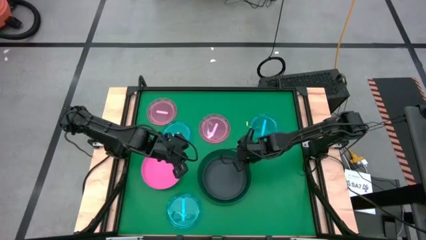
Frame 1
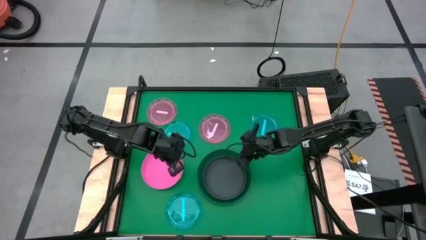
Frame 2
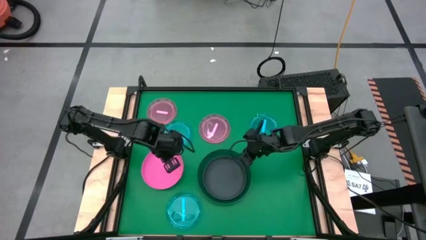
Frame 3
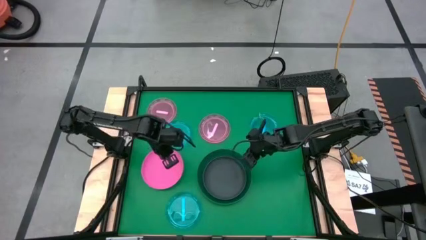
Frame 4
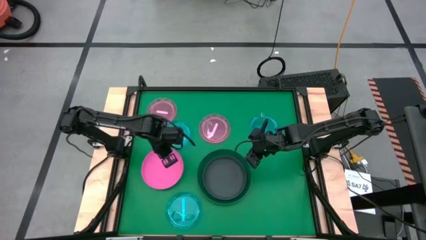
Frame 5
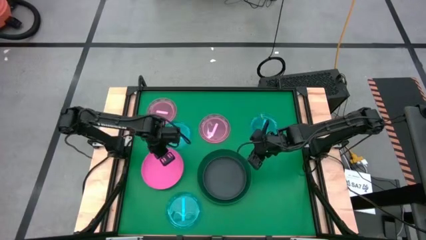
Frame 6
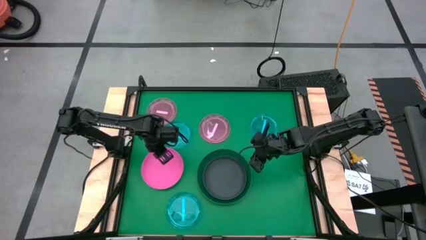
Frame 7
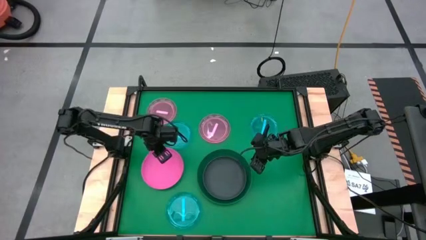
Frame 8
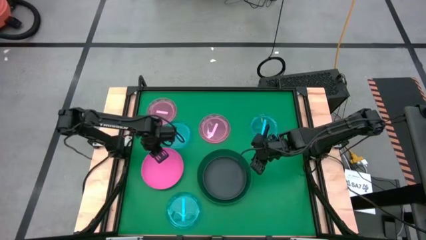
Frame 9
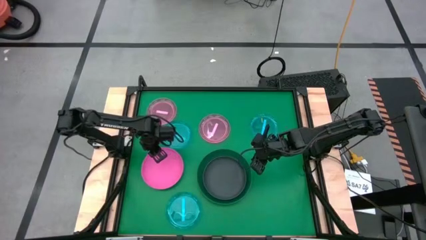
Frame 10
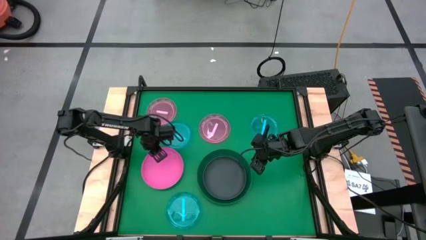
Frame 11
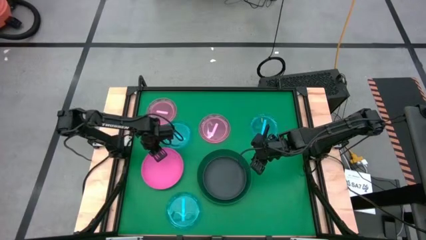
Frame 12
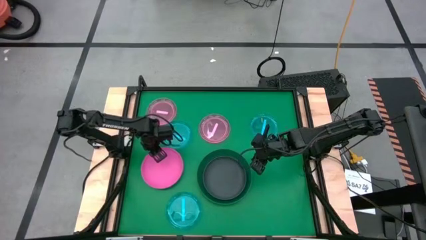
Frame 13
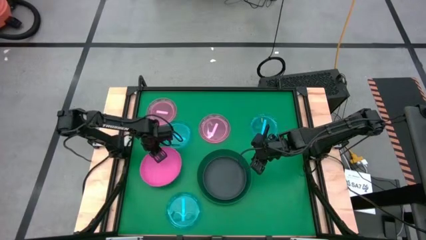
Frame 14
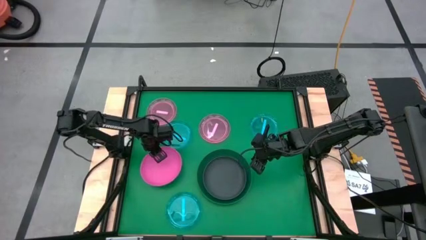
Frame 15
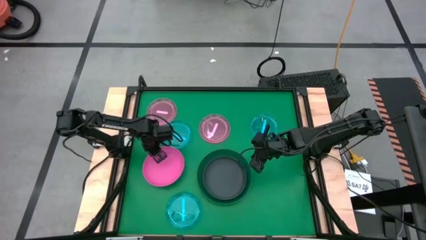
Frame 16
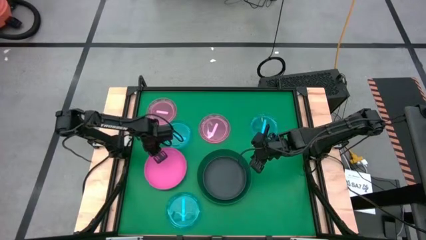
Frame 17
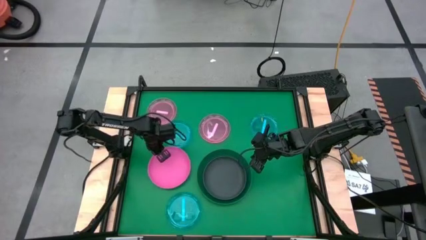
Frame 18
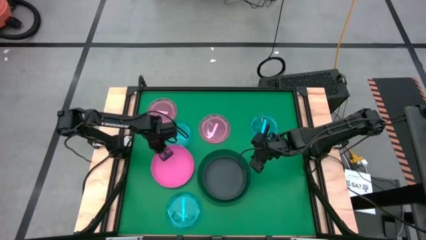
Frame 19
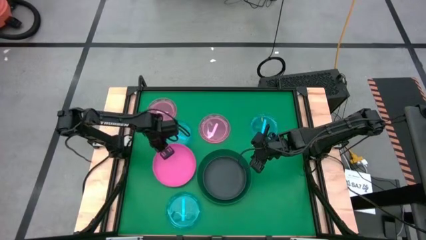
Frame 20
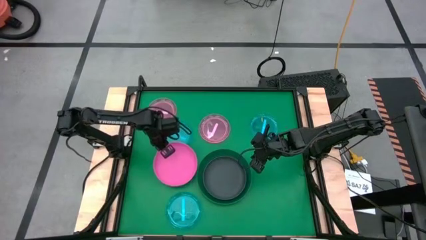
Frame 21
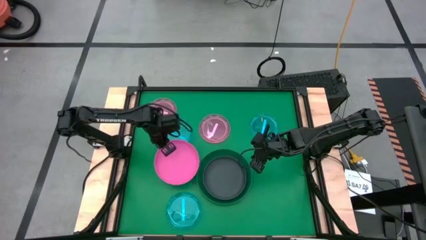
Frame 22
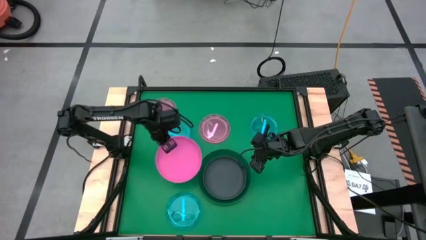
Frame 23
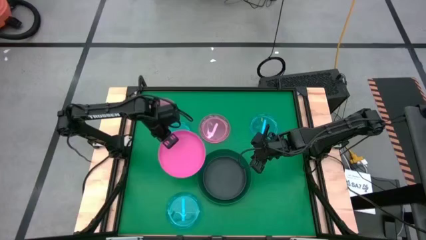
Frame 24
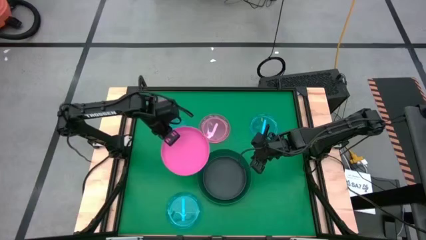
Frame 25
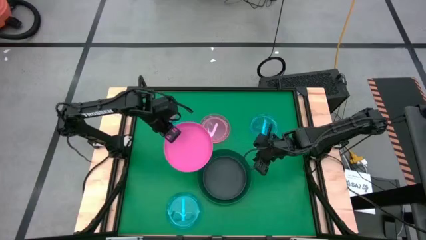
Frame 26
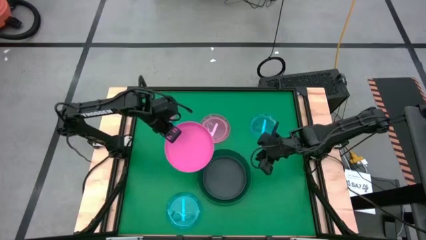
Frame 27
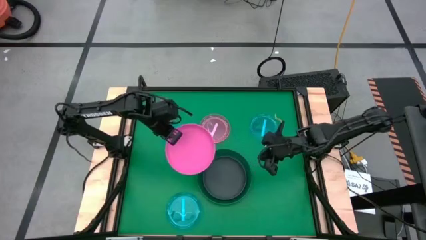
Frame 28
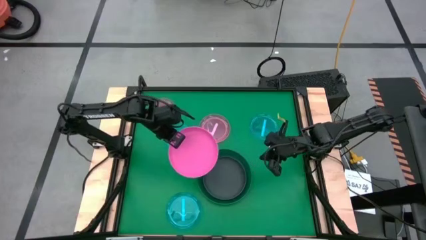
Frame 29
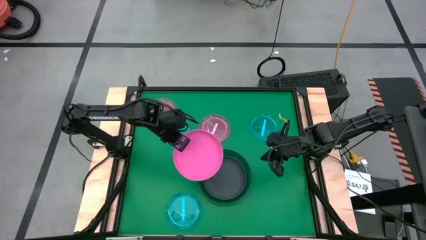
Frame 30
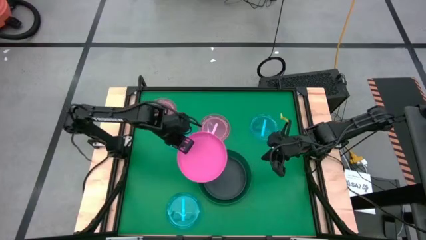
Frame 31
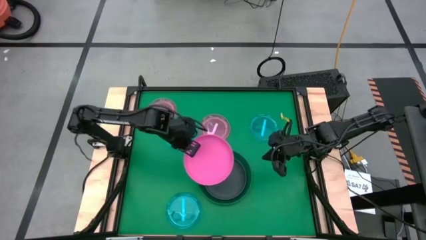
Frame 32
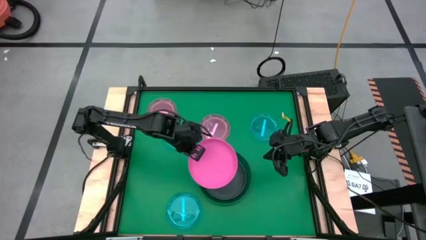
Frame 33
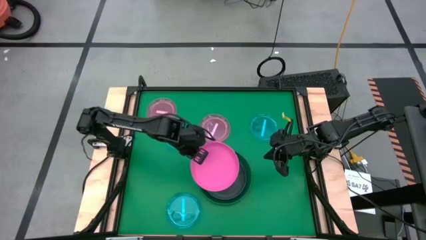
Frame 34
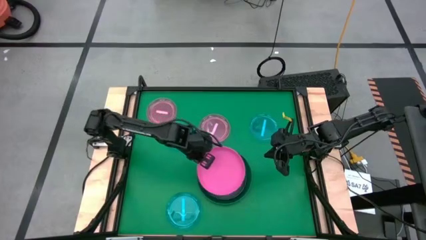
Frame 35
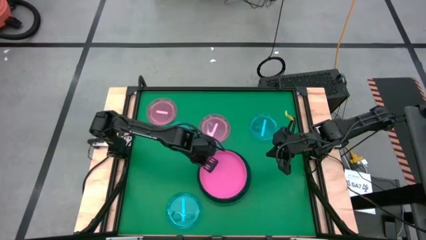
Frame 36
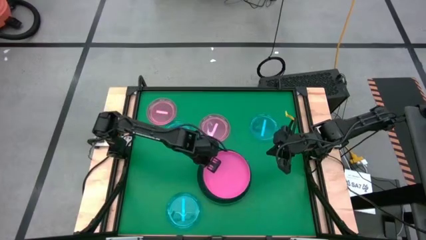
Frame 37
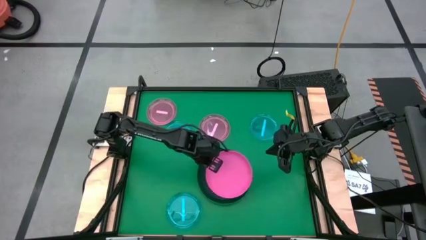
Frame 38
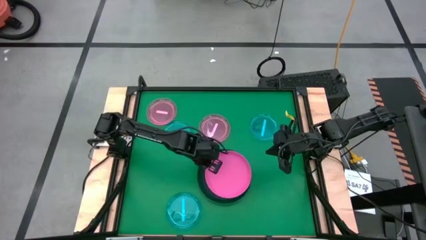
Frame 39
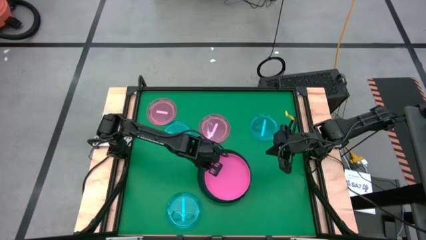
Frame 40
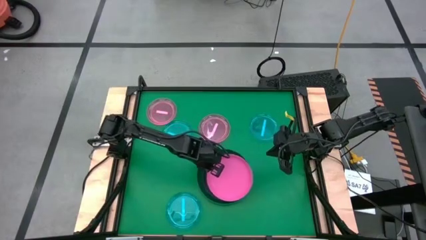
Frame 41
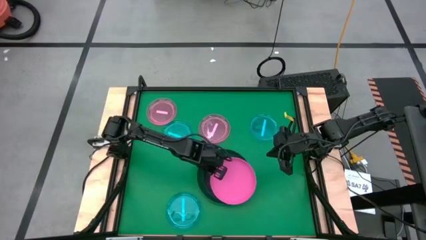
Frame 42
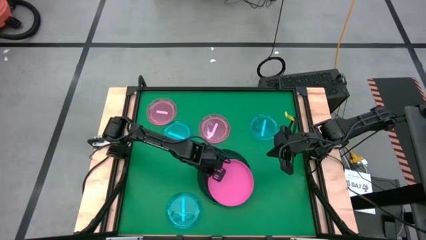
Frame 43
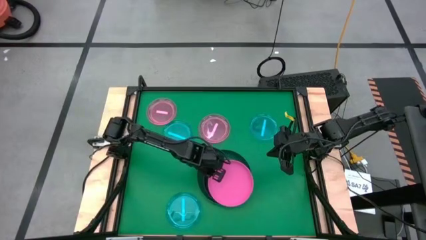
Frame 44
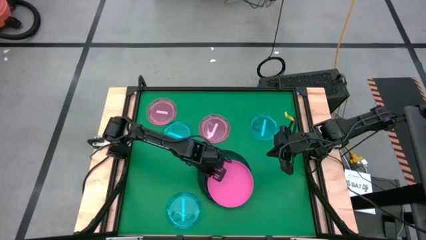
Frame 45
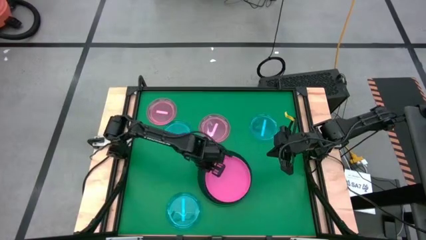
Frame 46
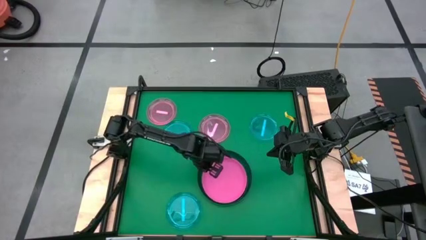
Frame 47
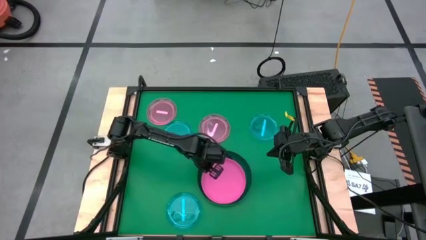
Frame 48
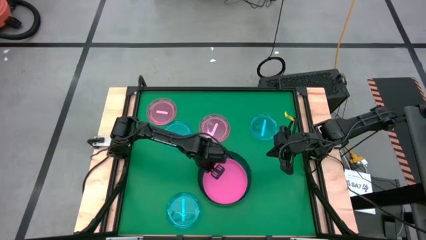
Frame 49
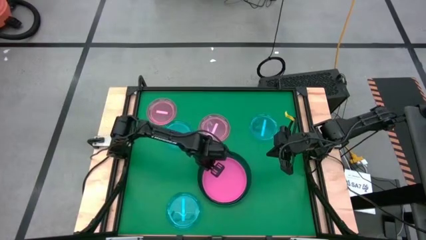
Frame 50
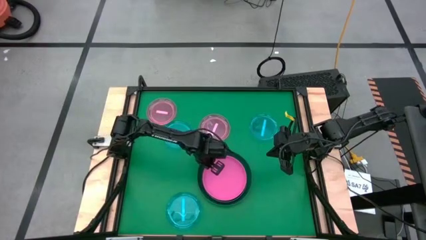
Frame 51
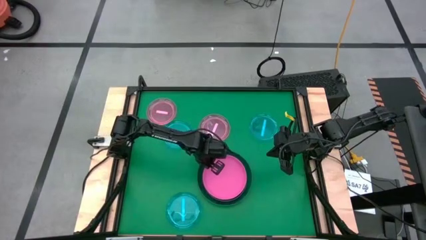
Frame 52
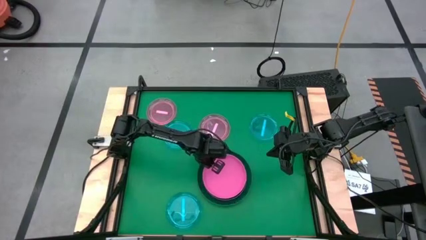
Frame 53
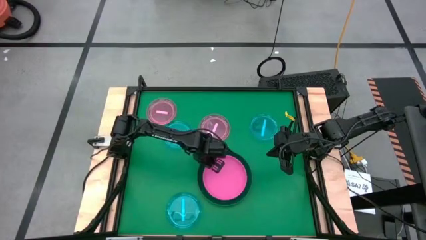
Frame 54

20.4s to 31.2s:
Task: Stack plastic plates
Stack the pink plate on top of the black plate

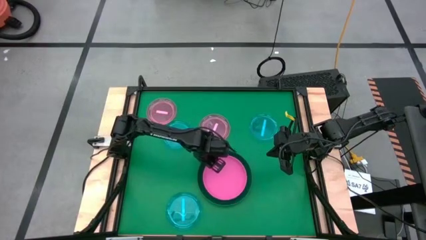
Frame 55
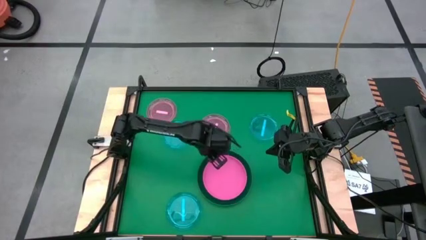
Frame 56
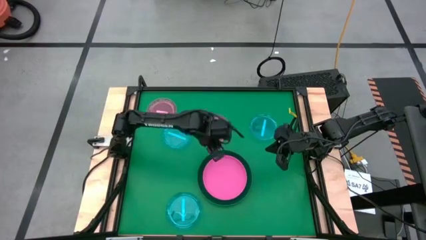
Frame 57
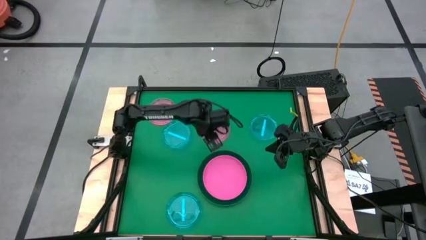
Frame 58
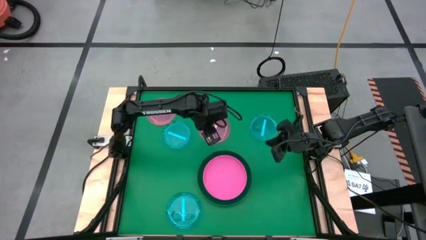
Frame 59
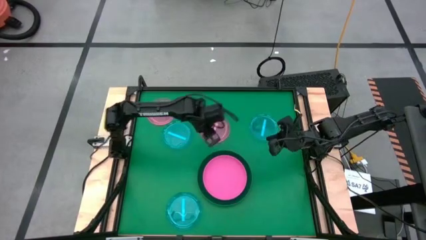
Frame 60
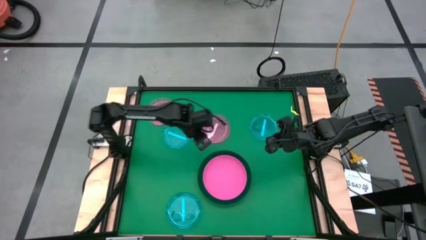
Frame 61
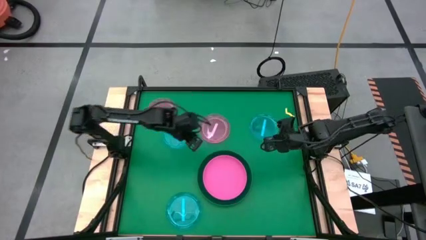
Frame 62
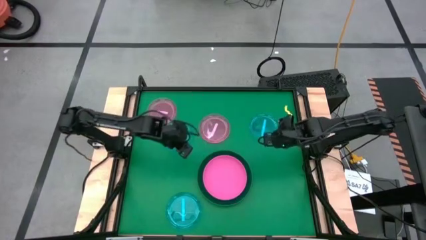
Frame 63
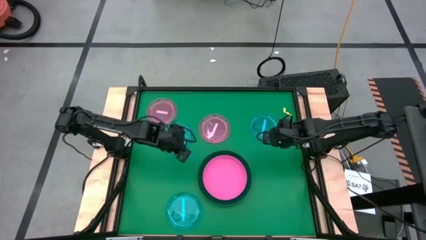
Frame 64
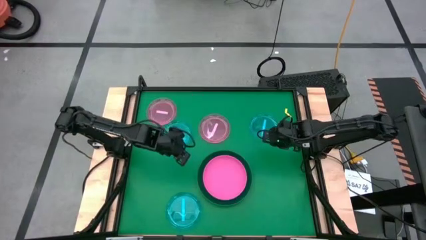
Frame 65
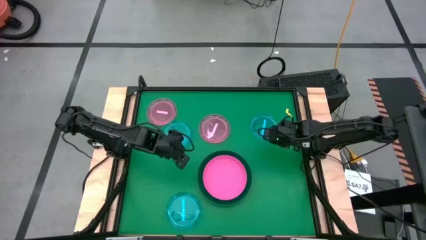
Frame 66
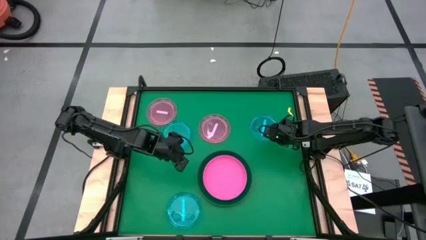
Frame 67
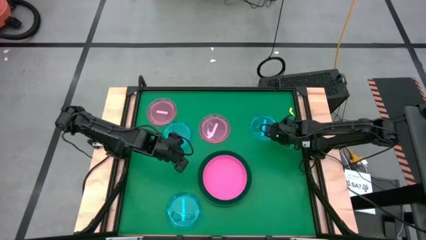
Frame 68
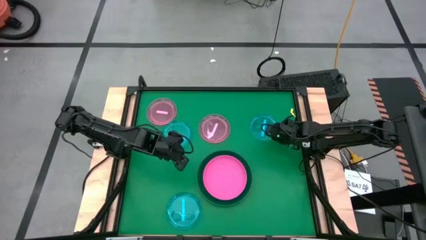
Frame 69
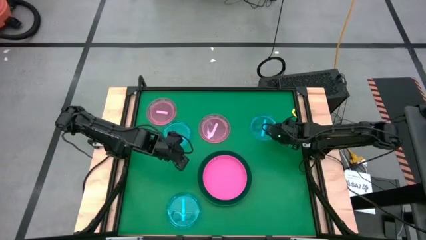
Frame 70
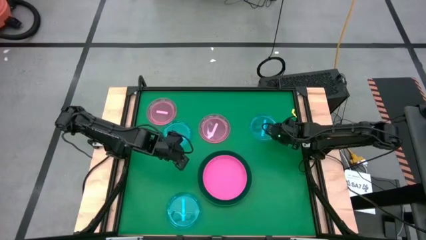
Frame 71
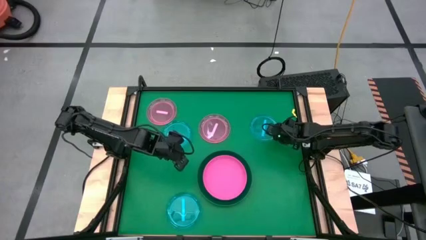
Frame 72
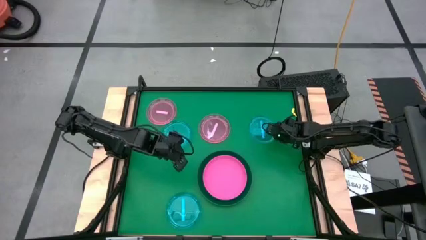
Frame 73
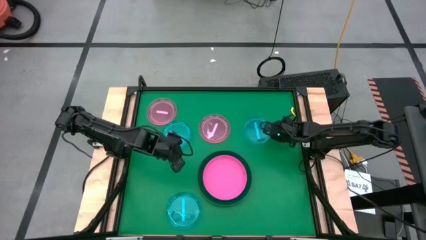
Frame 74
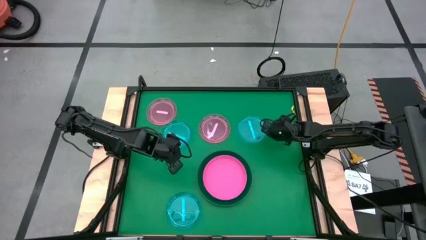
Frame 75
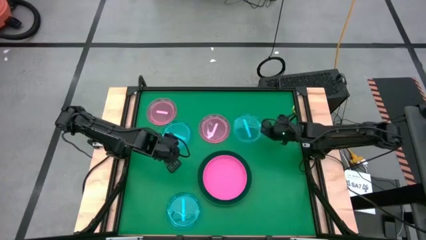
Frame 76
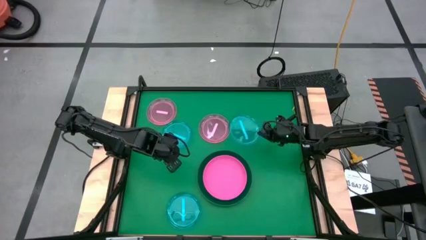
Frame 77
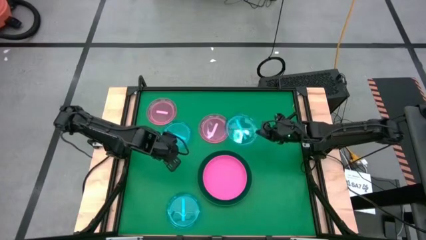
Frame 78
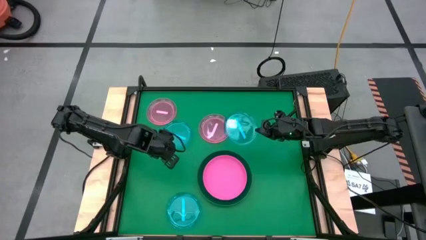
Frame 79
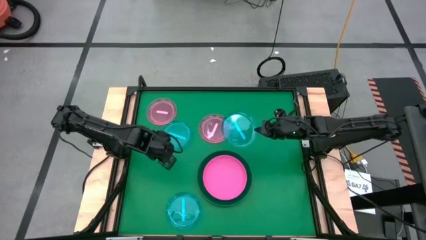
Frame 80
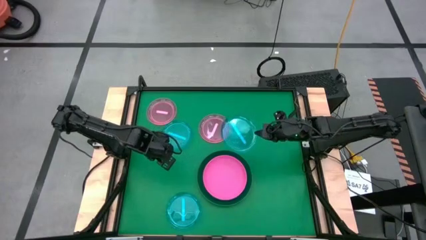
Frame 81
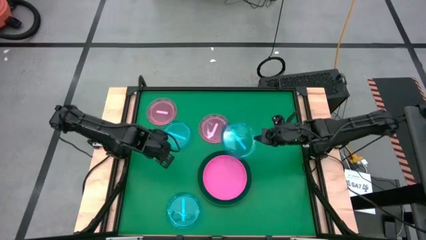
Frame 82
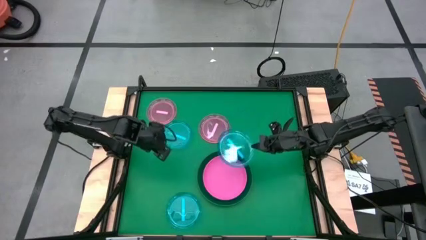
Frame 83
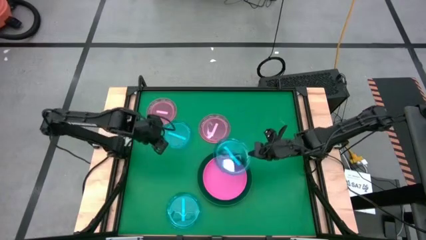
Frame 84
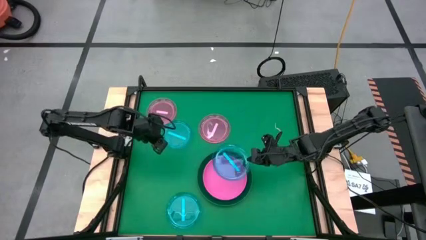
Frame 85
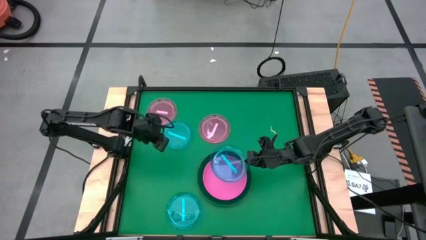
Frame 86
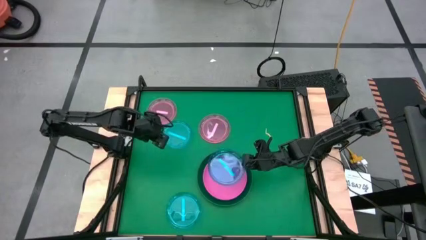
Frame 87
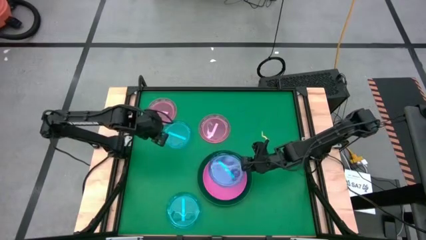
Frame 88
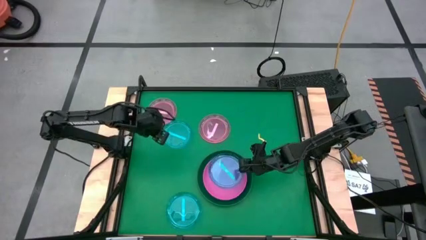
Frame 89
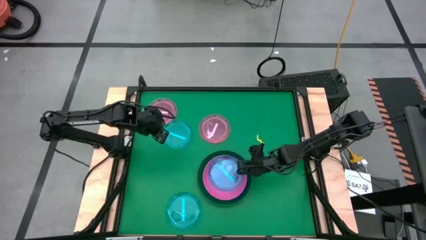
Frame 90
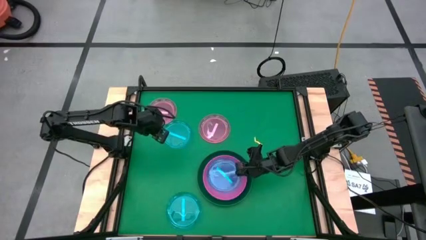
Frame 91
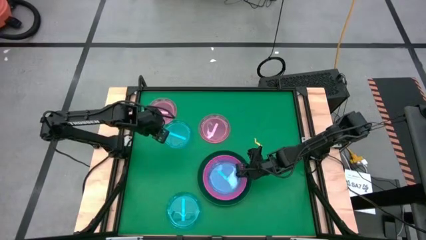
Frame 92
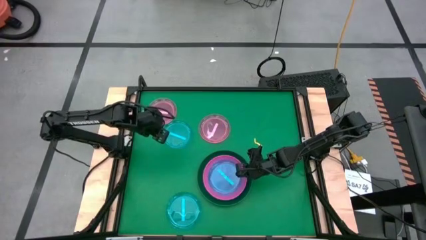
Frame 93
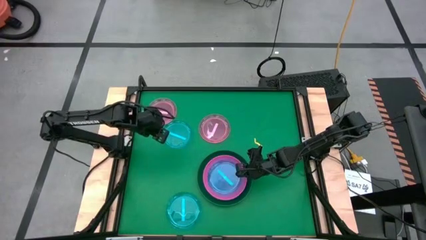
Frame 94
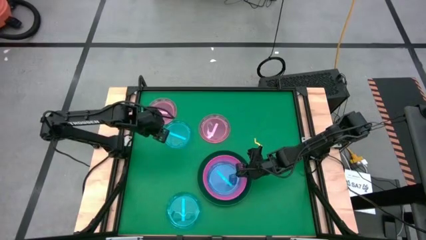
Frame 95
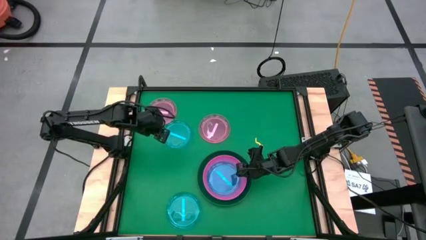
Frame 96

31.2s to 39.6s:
Stack the top right blue transparent plate on top of the pink plate
